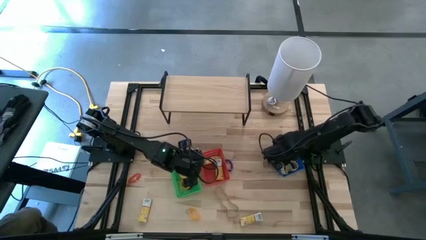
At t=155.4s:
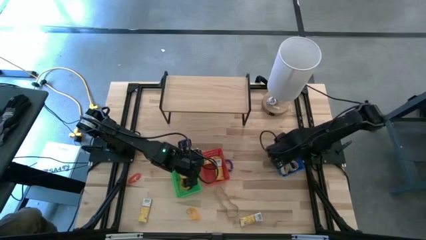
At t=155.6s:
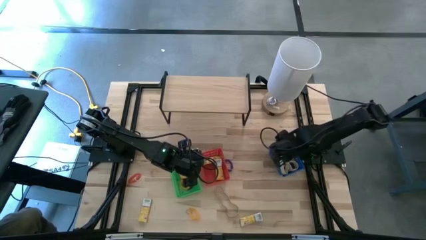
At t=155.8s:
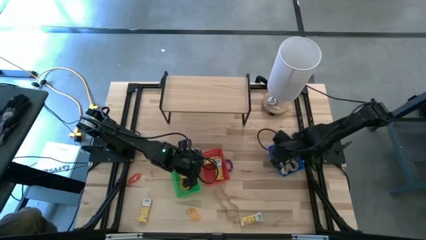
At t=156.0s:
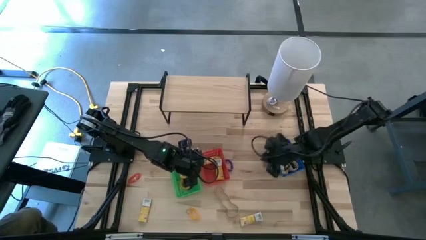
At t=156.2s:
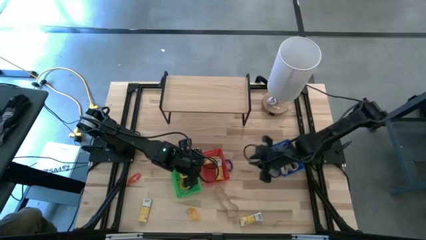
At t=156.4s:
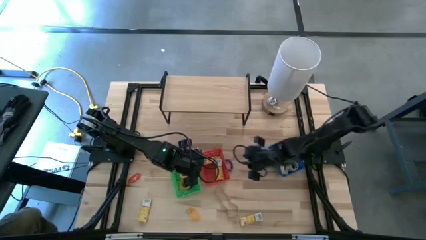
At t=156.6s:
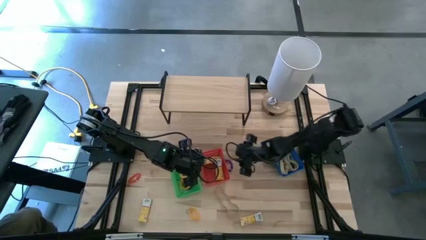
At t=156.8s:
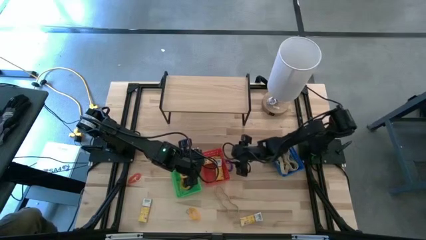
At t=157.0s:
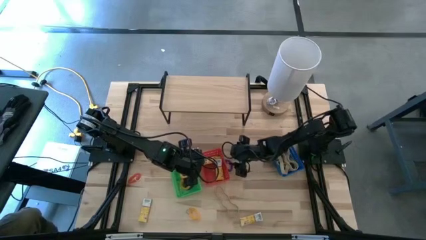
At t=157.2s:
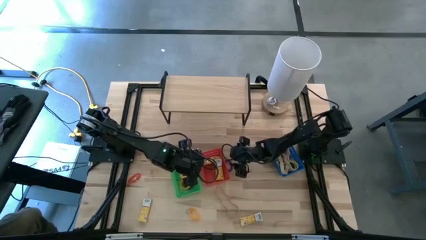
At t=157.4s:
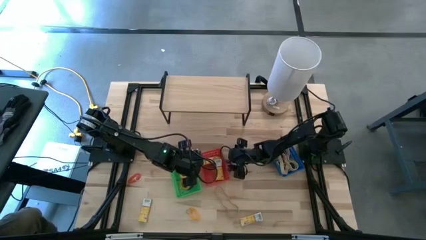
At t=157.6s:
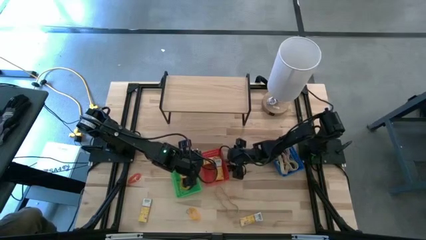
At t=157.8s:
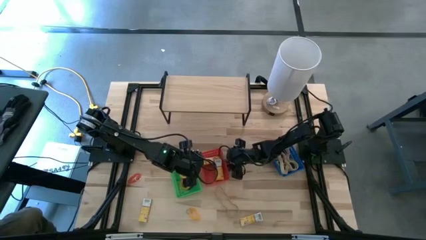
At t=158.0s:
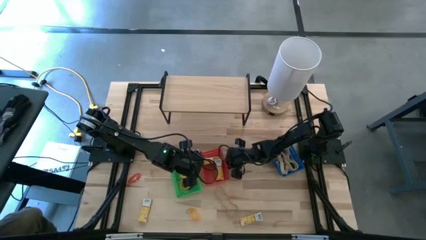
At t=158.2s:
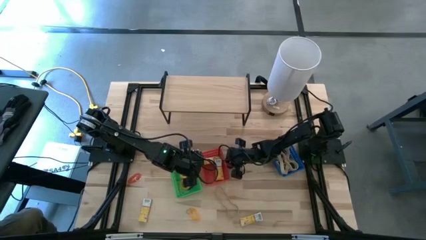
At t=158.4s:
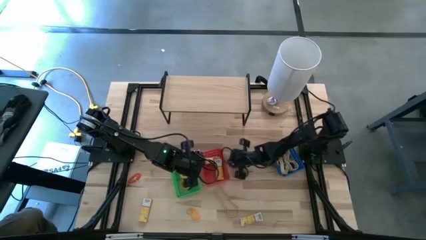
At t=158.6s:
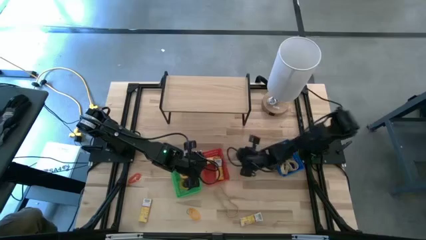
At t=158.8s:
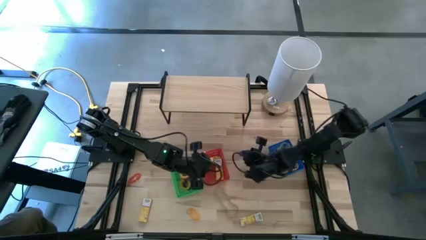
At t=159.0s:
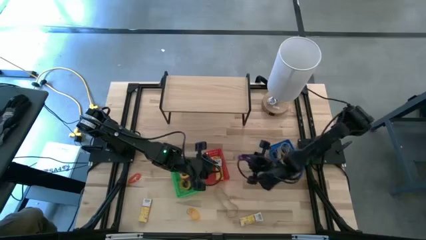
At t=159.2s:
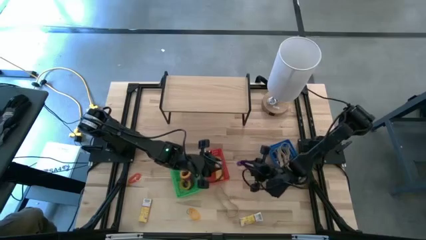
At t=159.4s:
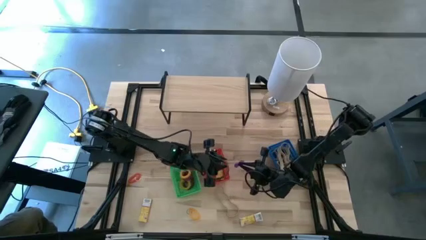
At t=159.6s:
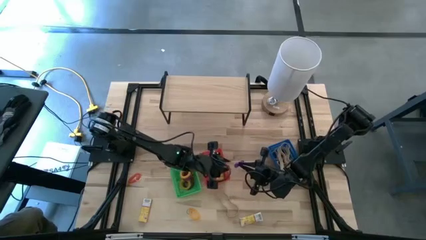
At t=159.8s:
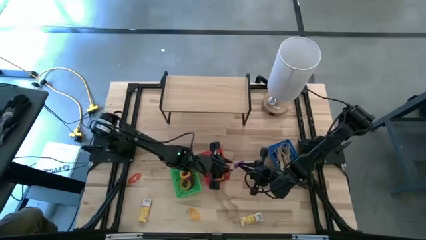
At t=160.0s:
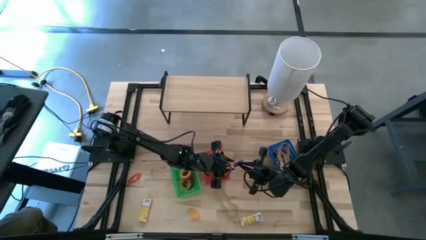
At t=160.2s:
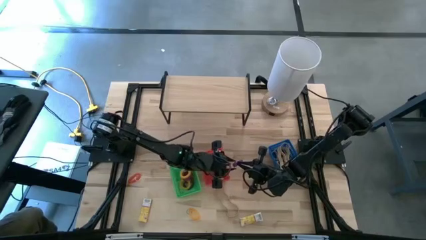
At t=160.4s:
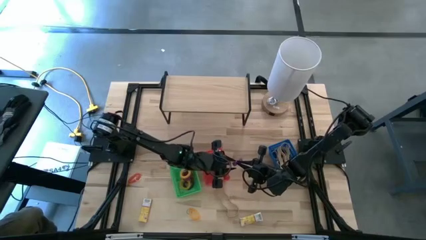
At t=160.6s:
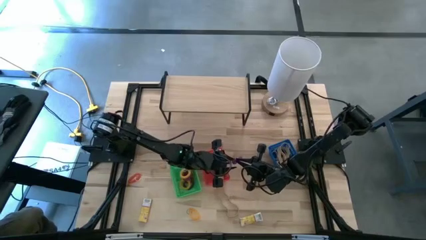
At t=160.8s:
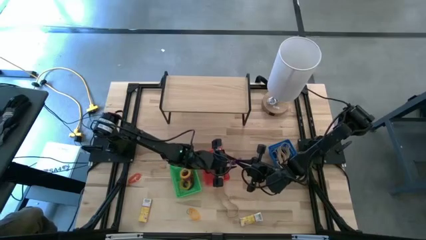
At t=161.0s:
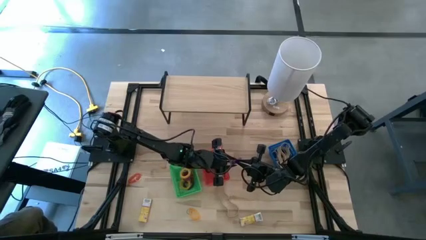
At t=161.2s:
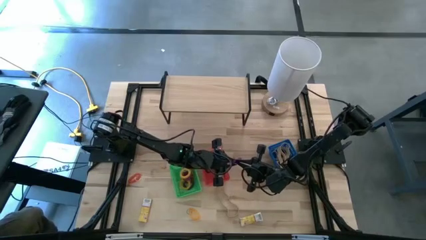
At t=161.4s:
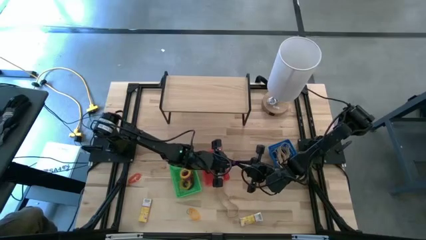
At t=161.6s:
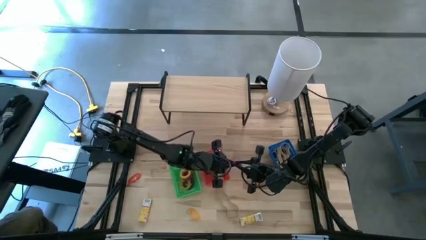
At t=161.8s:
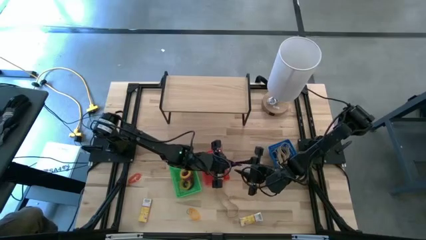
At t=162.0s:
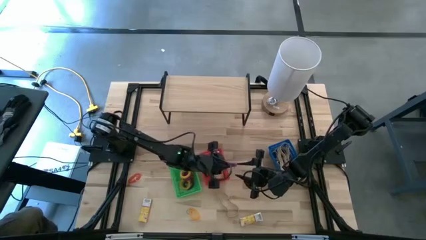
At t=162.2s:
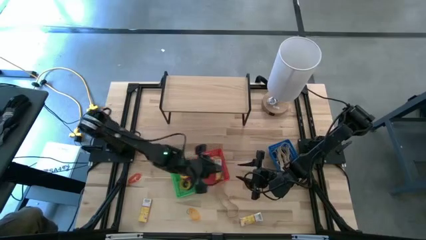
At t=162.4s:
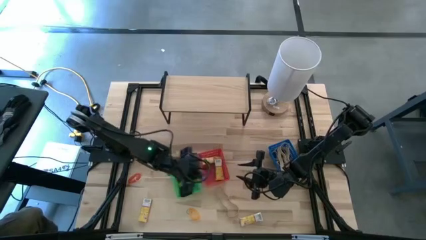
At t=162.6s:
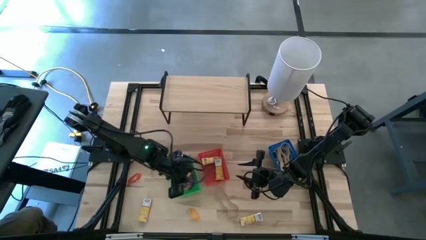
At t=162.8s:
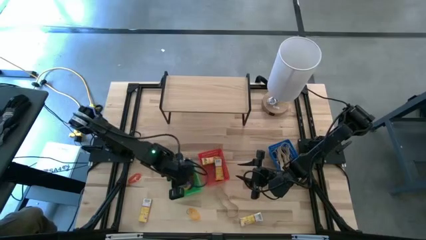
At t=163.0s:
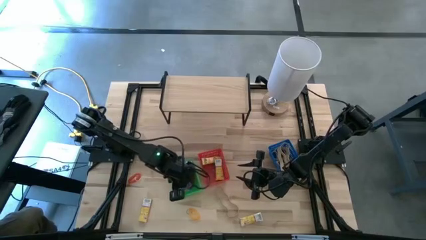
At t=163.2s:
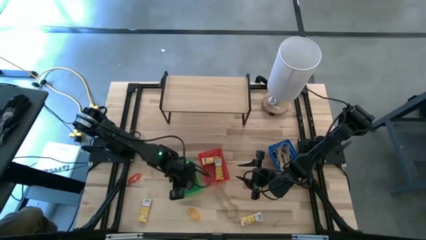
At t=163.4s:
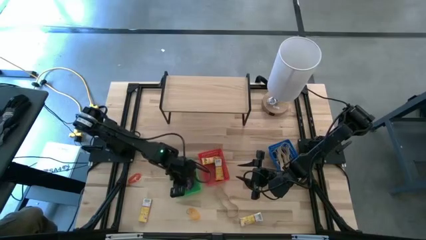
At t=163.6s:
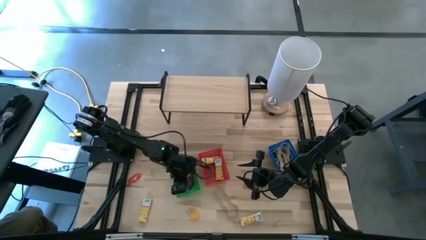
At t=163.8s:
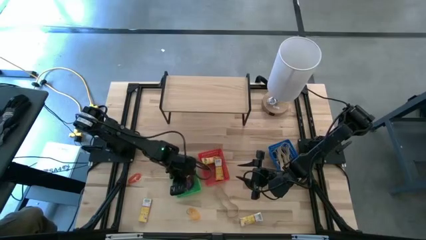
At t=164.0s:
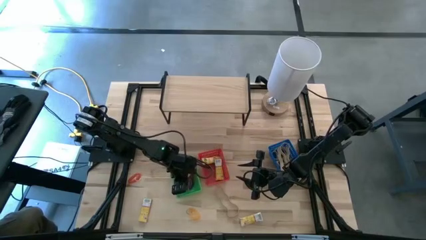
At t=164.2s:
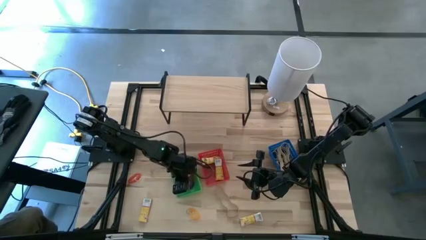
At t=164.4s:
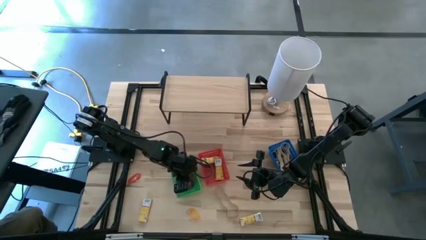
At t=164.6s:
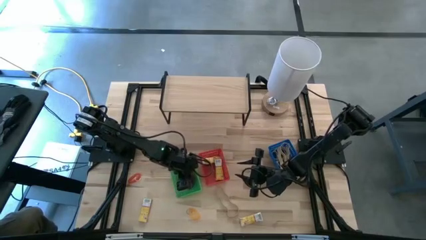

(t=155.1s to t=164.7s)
Task: Pick & Place Office Desk Supplies
Put the violet spring keychain into the green bin

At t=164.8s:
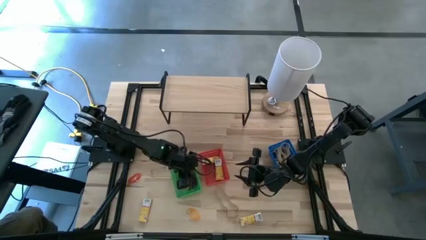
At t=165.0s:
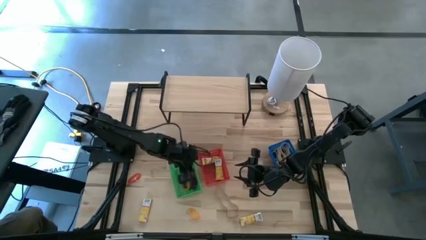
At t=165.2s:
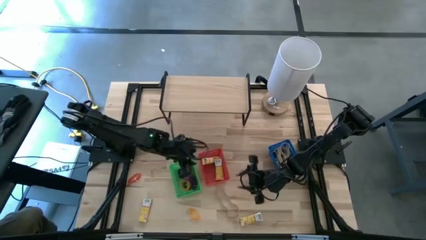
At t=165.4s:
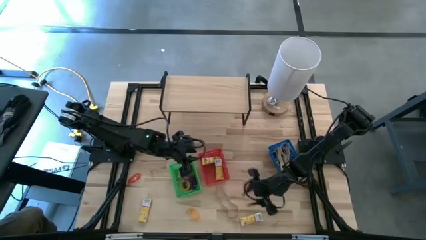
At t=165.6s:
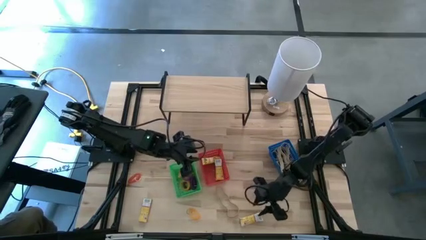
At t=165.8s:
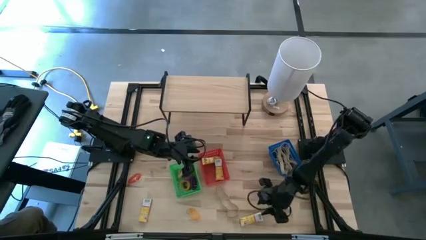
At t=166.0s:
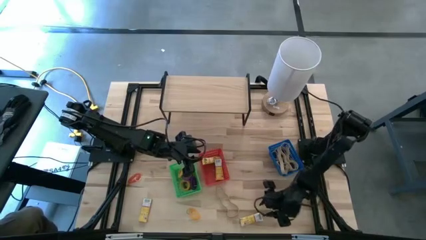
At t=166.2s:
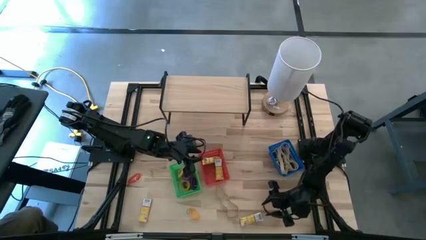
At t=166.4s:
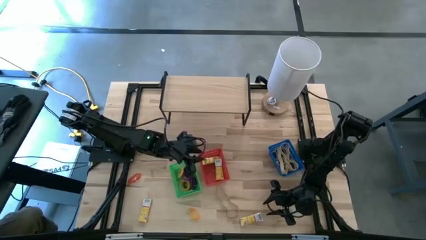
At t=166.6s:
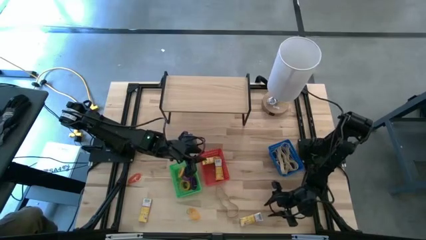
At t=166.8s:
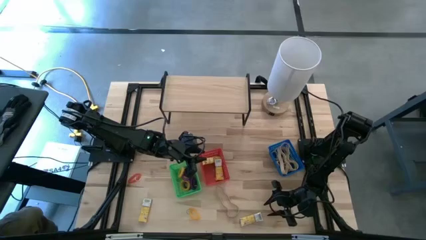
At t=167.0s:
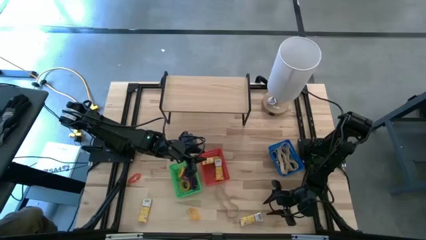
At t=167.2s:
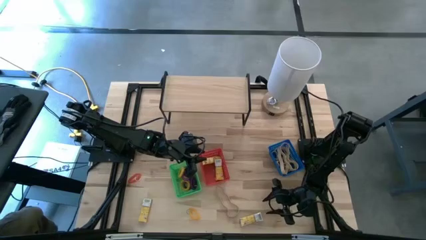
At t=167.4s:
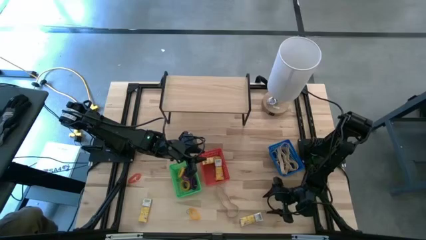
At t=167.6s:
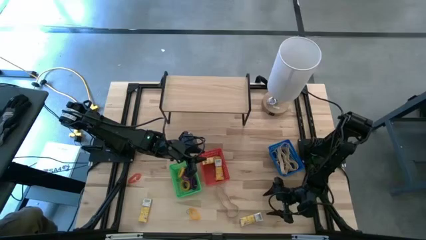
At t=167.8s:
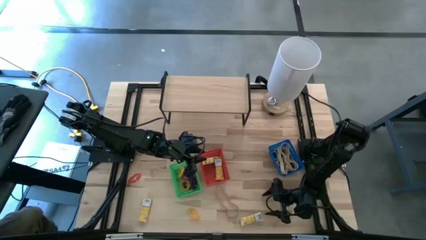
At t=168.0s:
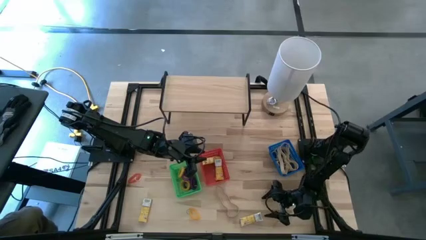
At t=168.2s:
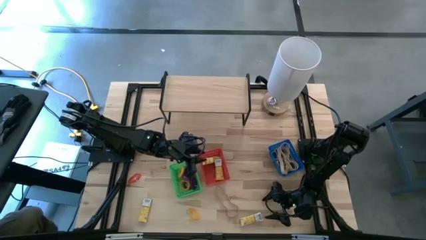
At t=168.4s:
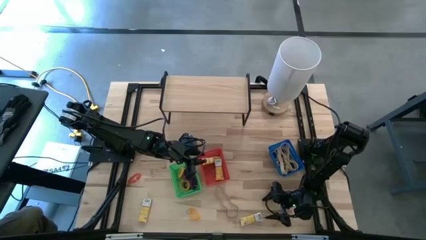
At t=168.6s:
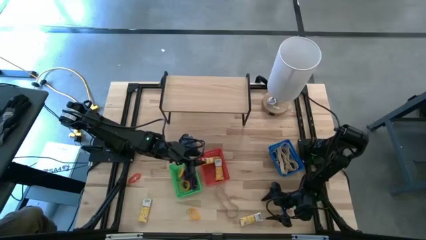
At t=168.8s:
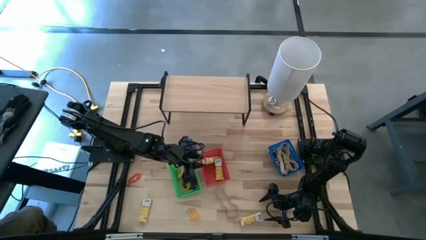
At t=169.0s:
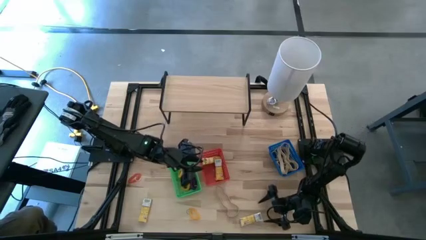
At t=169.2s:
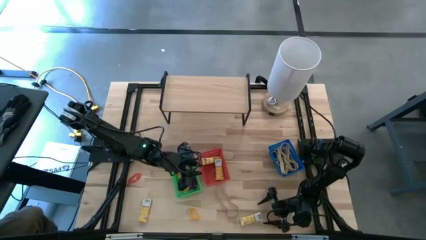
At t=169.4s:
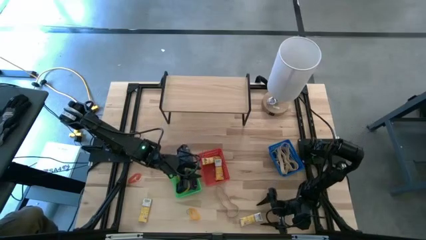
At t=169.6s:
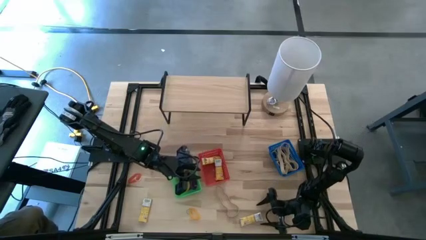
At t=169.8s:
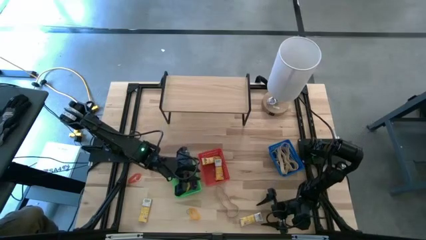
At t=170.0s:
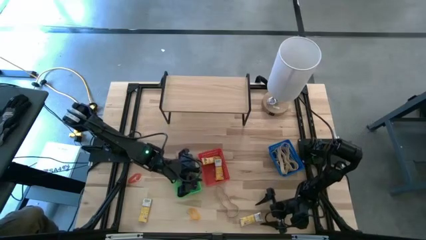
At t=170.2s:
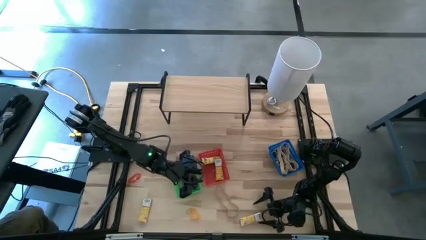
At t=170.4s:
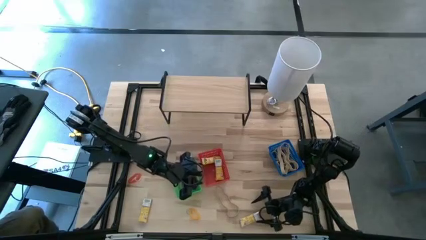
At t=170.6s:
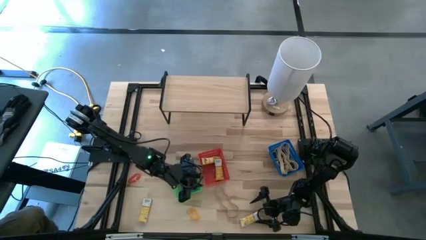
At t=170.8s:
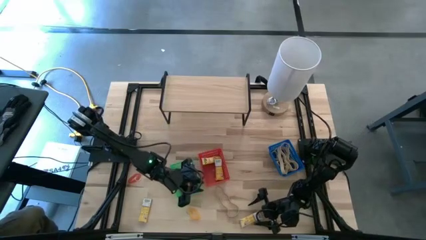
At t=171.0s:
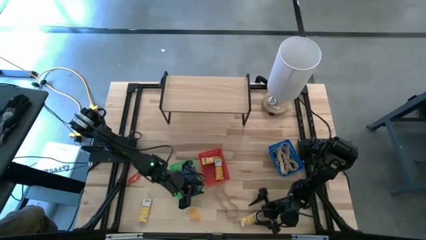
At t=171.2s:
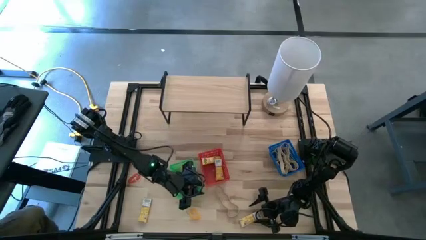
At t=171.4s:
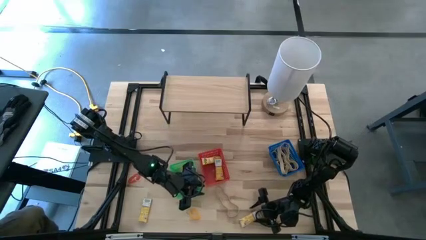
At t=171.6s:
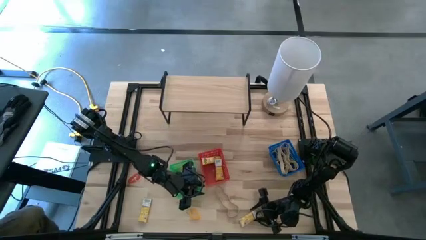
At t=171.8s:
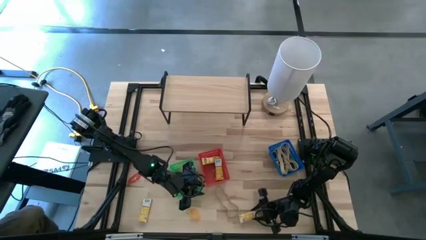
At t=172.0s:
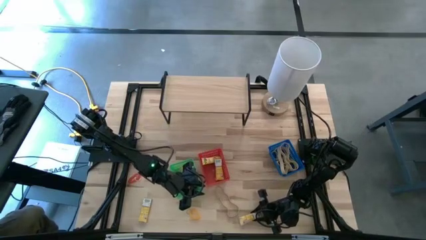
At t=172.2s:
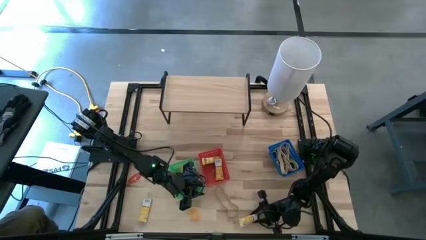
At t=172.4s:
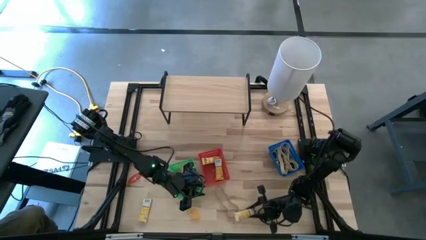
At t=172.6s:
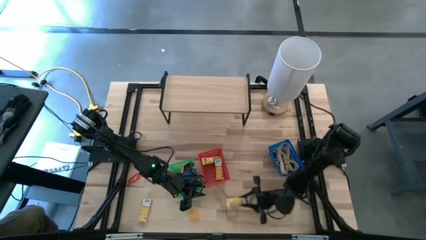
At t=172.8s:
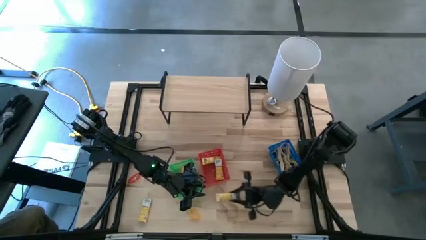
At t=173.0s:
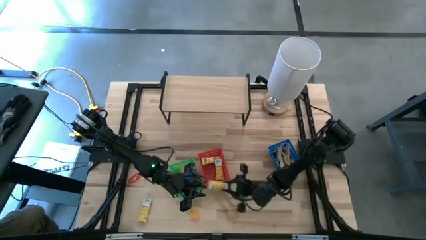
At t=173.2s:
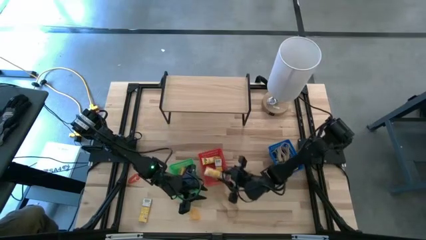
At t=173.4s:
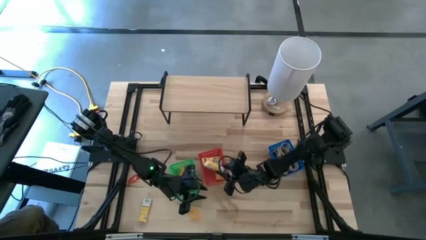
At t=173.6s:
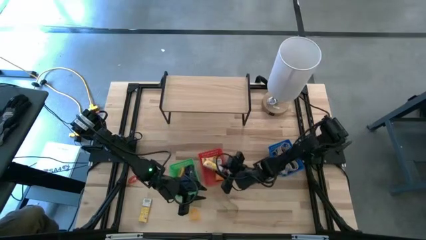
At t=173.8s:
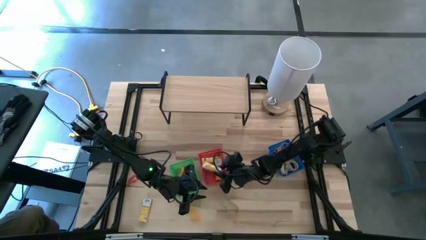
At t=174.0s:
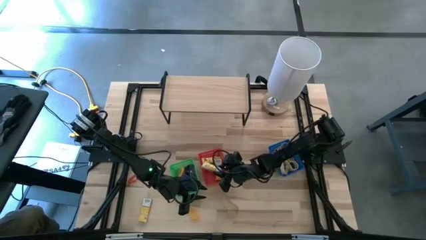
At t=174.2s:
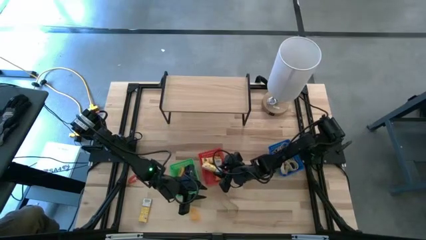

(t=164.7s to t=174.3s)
Put the yellow crayon box into the red bin
